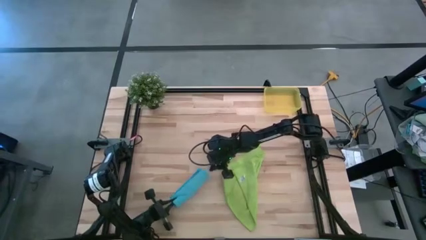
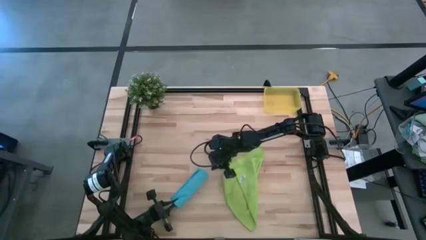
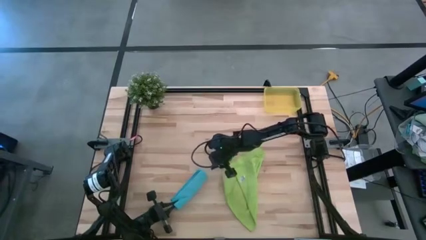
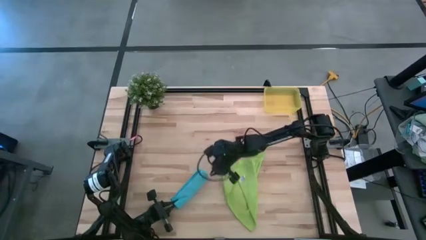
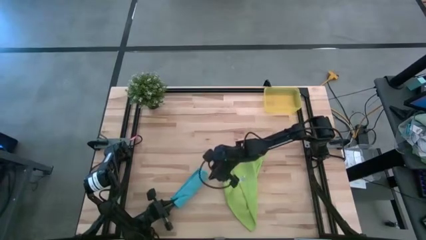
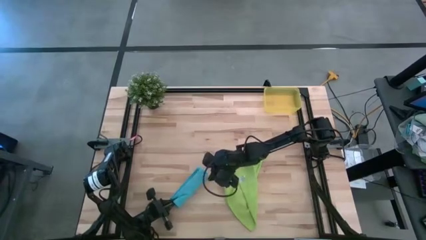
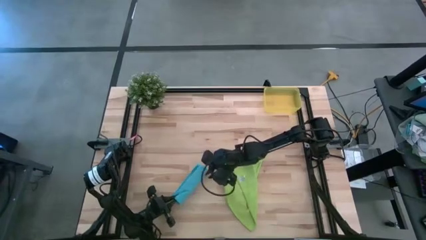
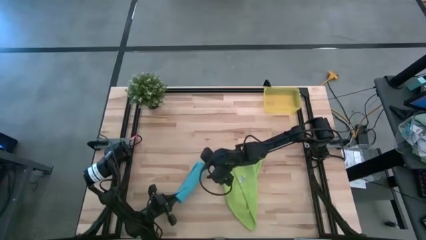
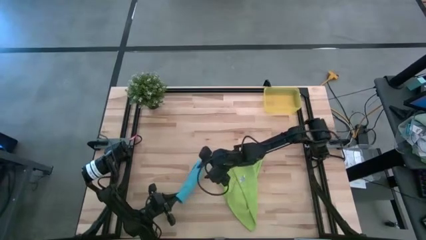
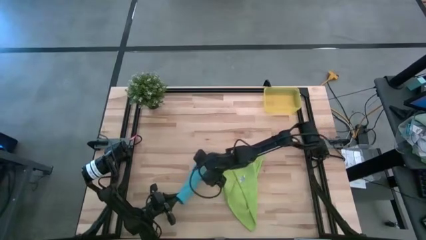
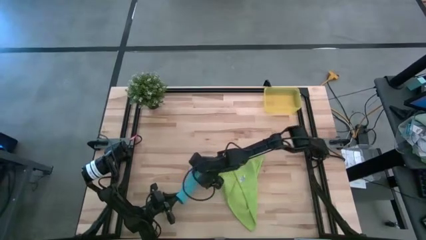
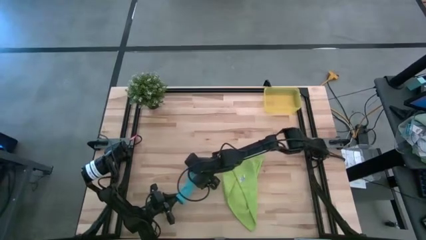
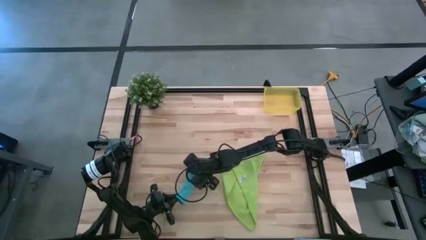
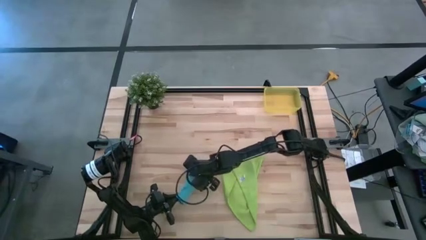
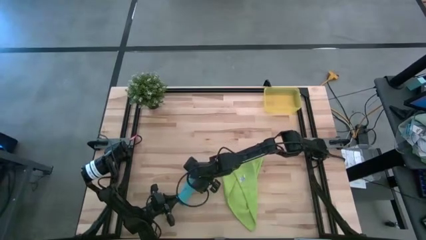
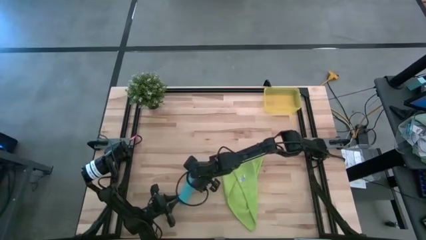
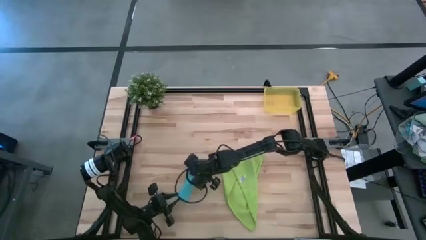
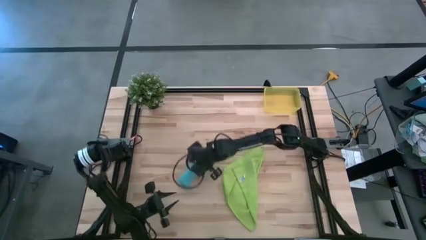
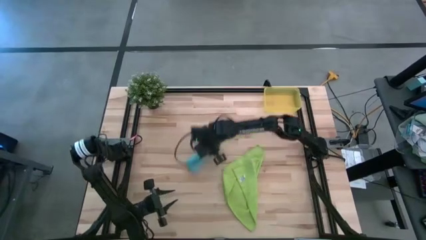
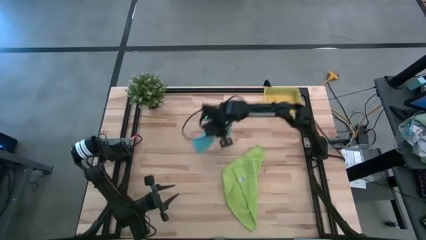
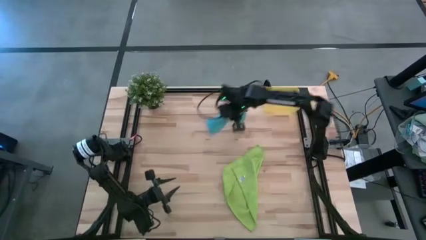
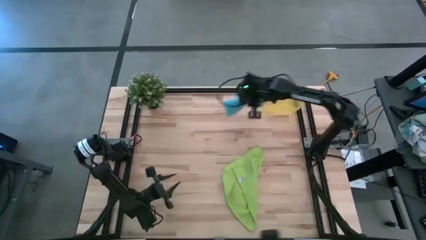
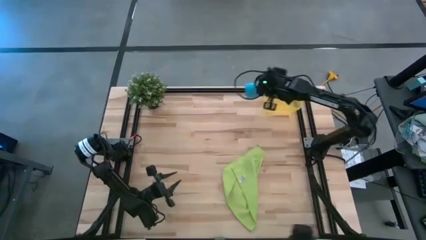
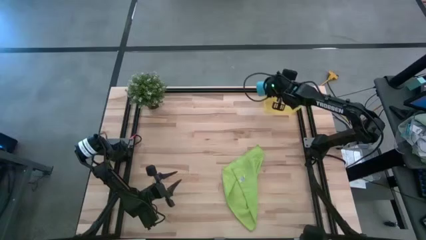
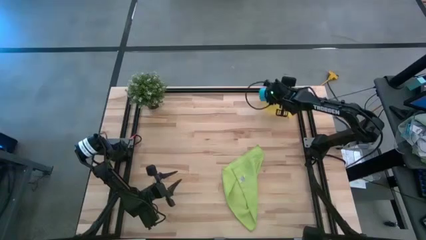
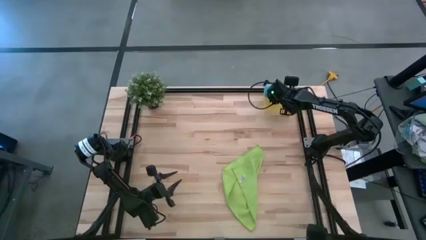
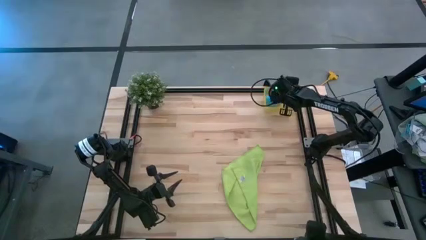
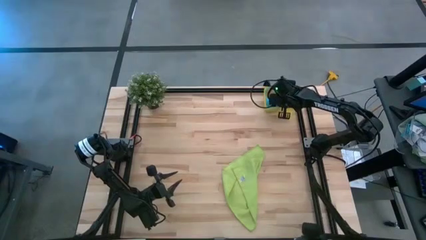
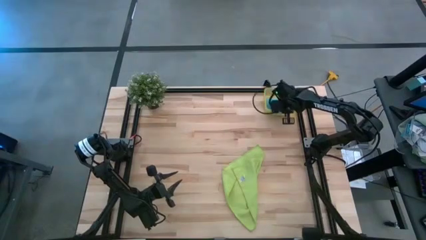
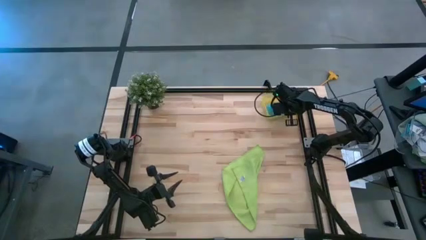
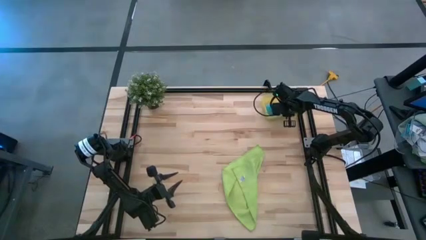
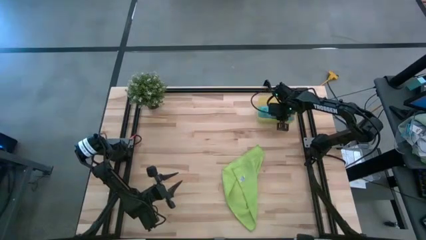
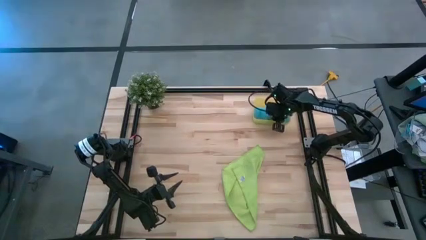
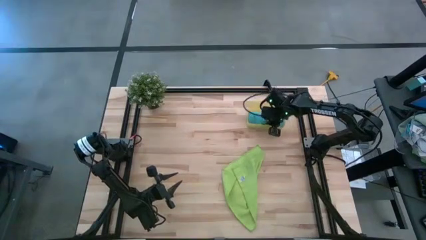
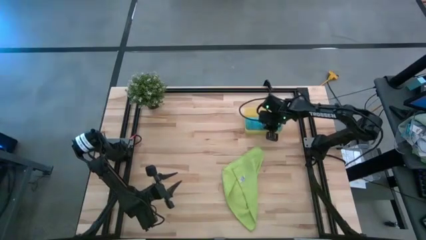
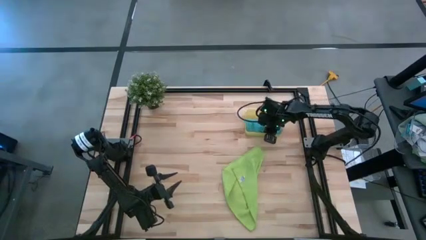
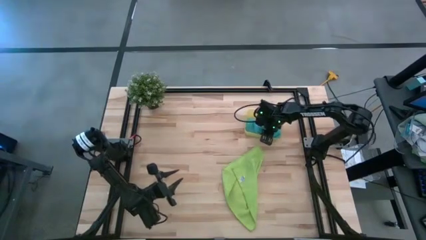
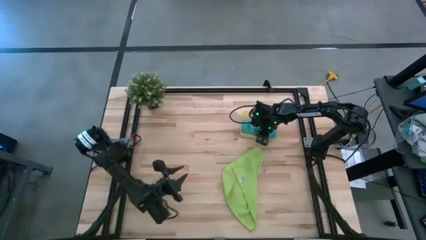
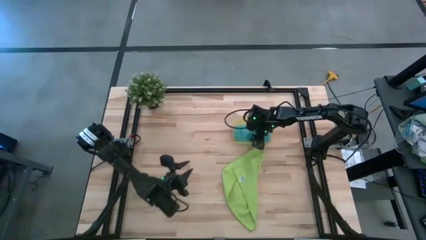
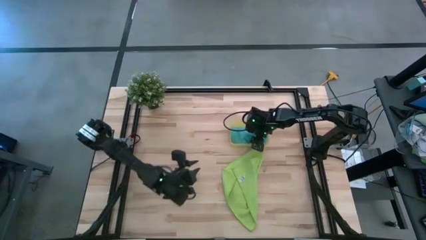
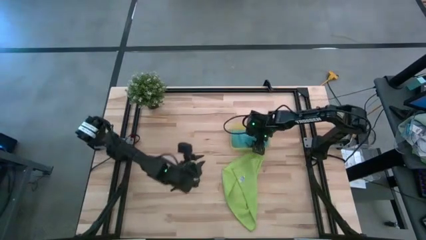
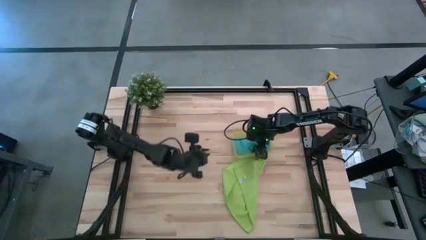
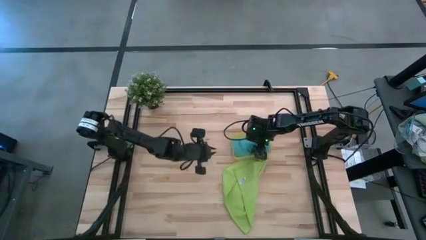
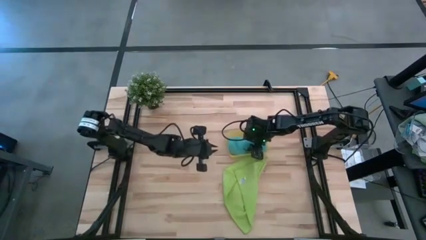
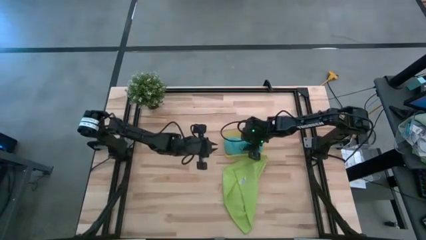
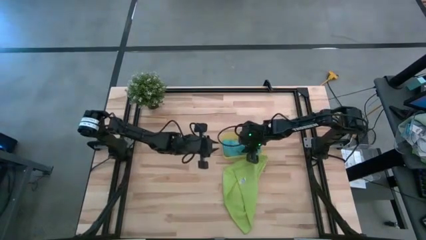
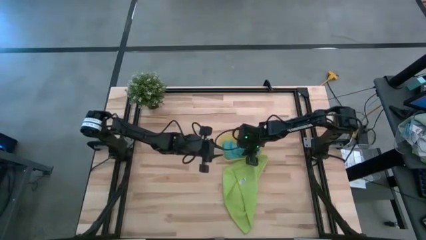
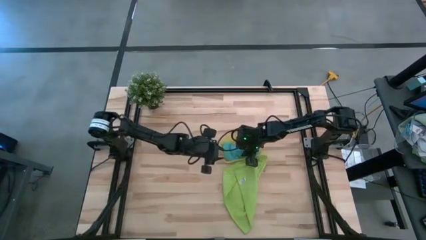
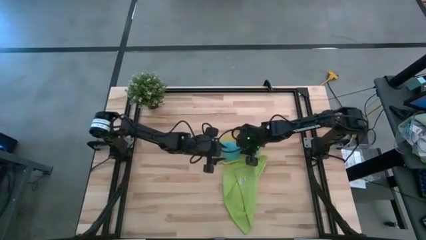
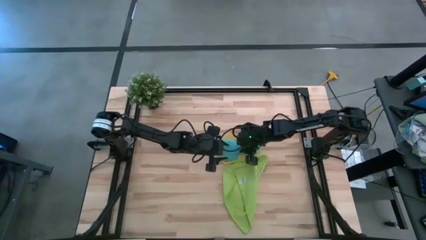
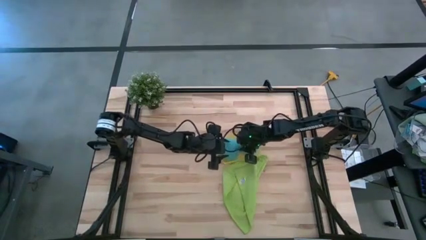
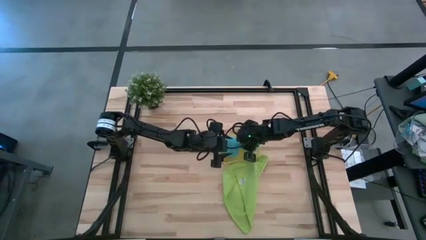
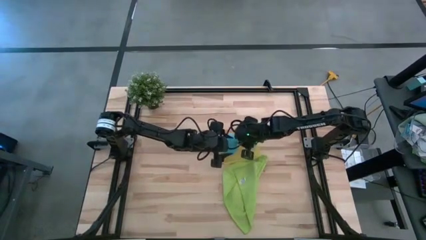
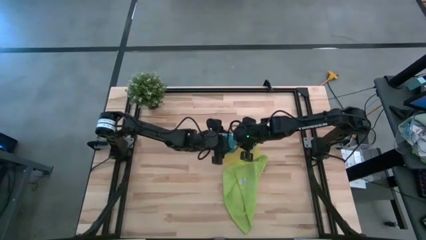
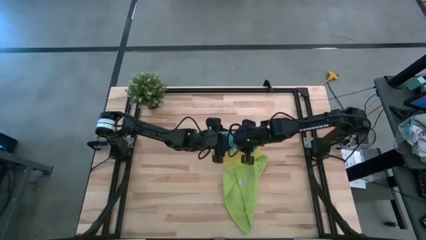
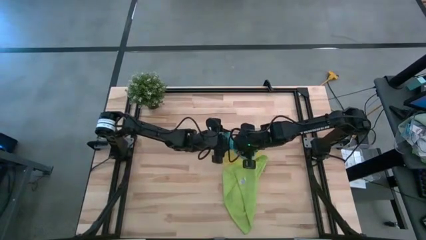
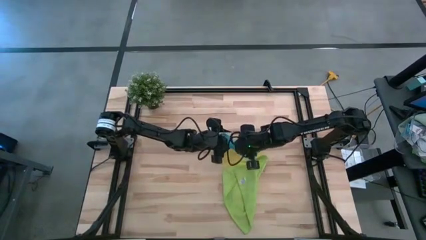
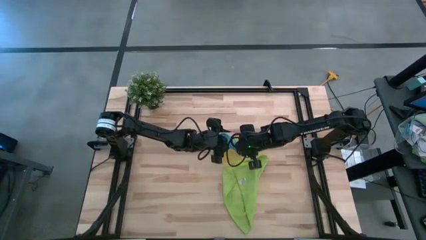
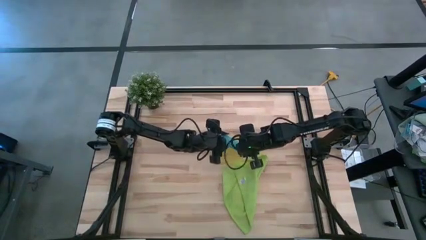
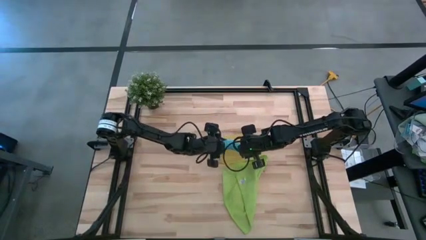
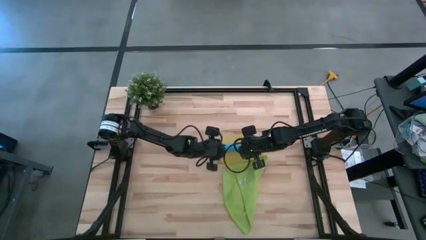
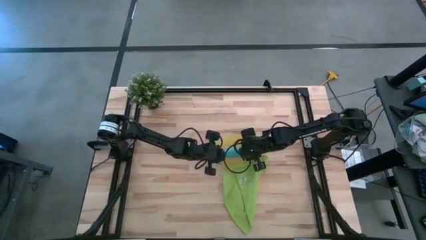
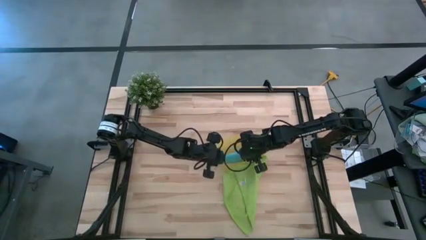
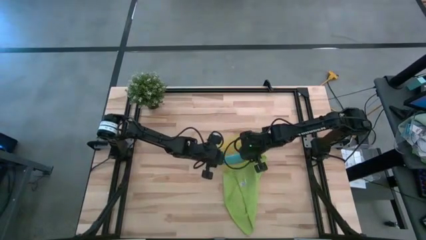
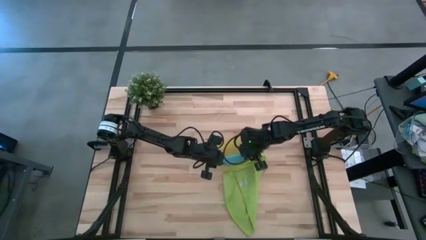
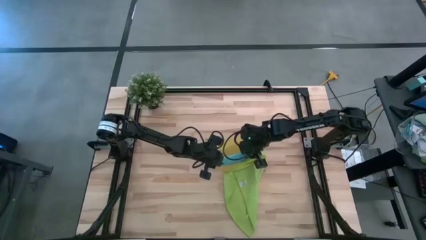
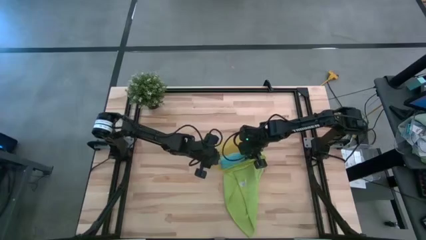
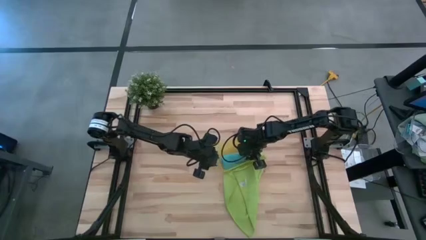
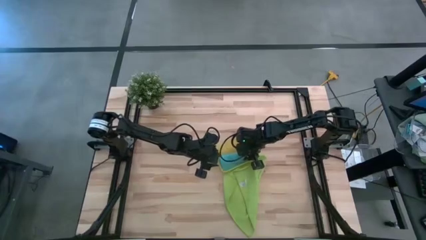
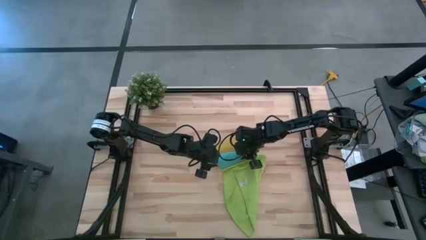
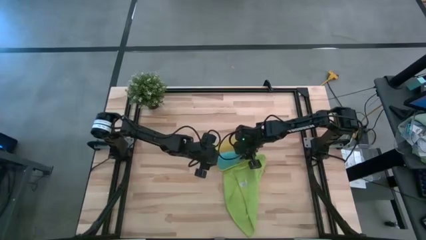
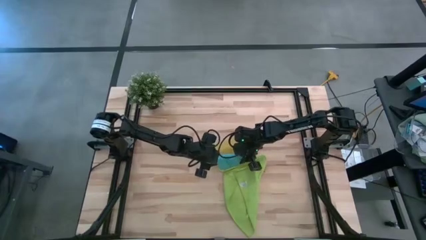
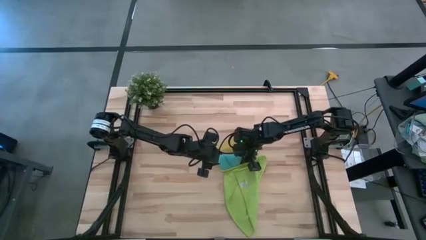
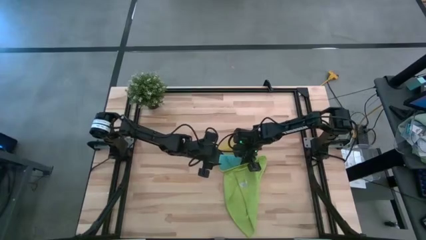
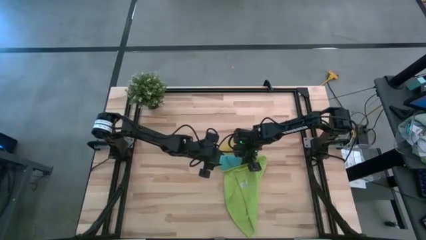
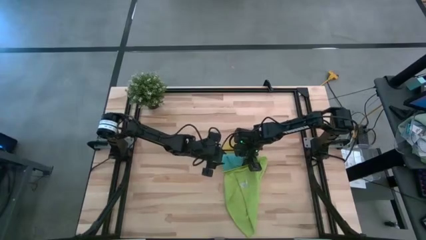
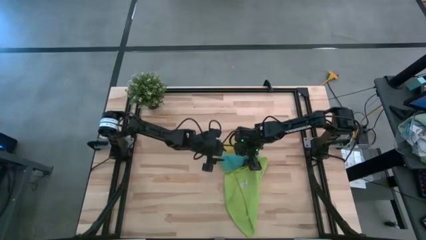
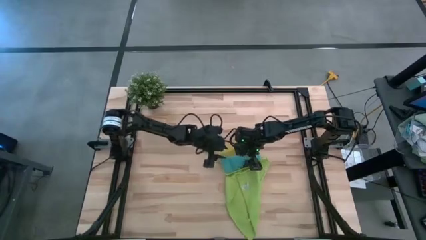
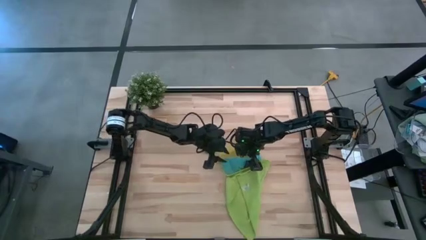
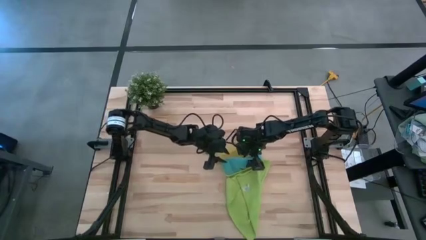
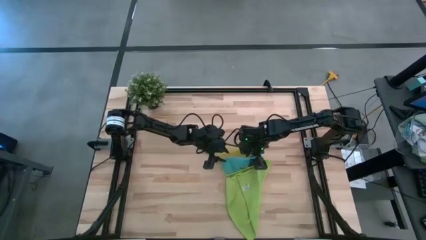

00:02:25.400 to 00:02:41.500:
Task: Roll microfiber towels into tight, uniform cylinder then place into a basket
Put the blue microfiber towel into the yellow bin
